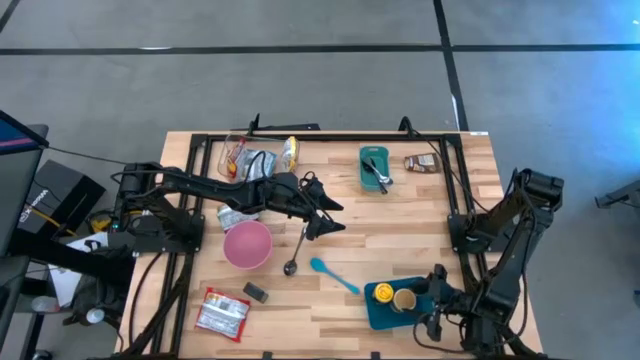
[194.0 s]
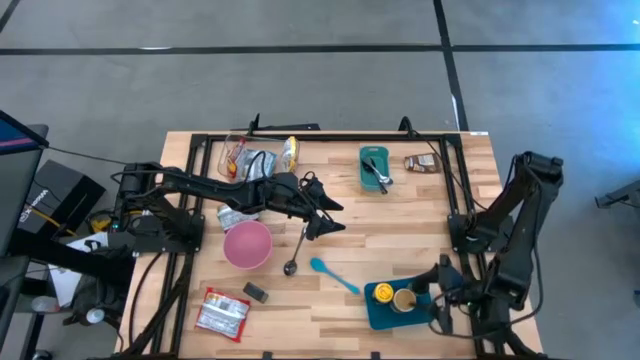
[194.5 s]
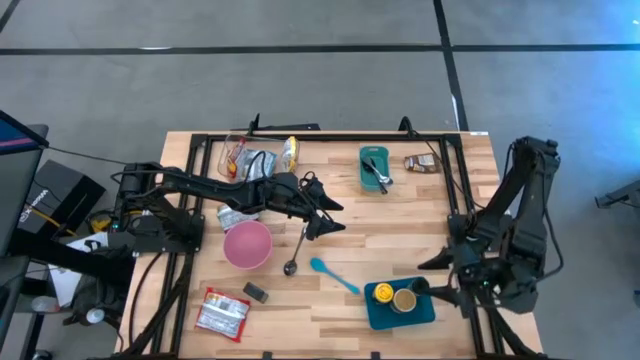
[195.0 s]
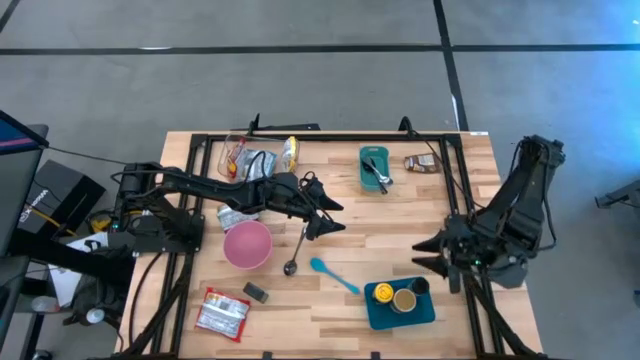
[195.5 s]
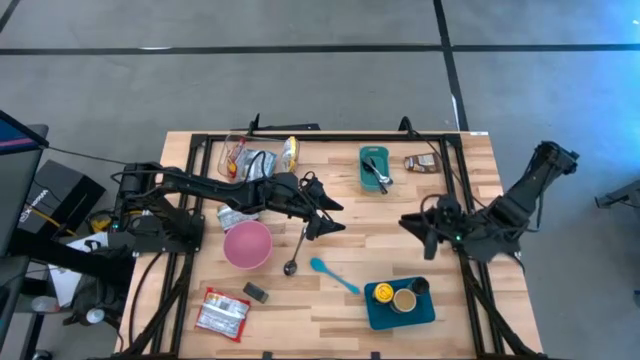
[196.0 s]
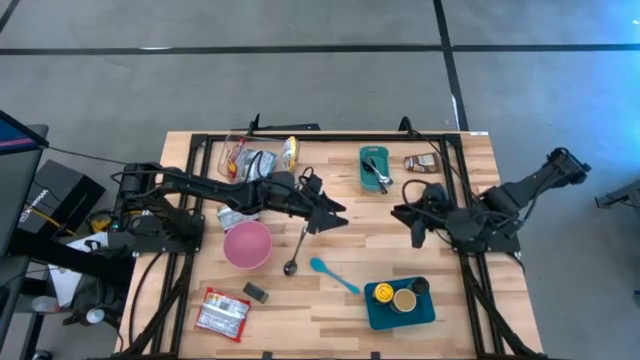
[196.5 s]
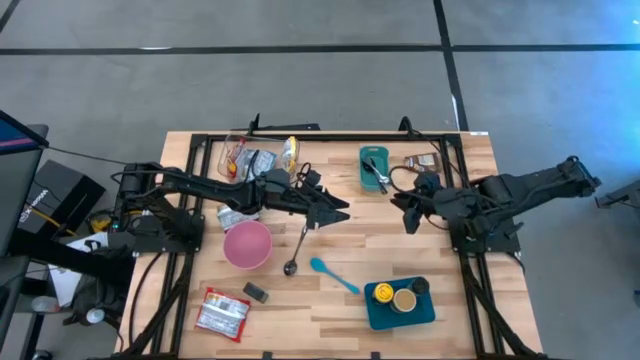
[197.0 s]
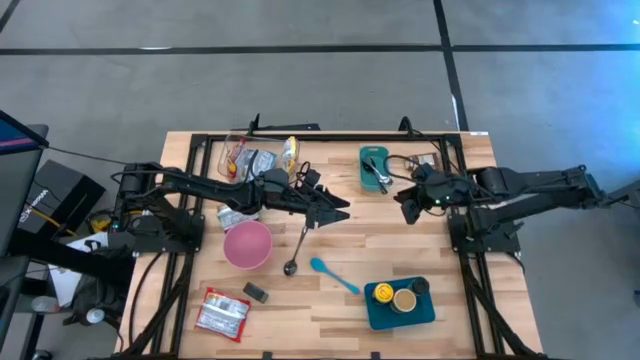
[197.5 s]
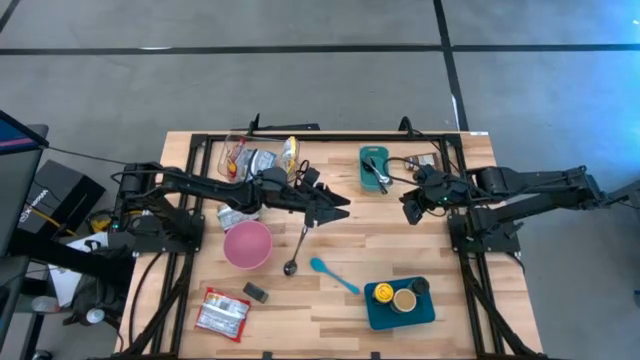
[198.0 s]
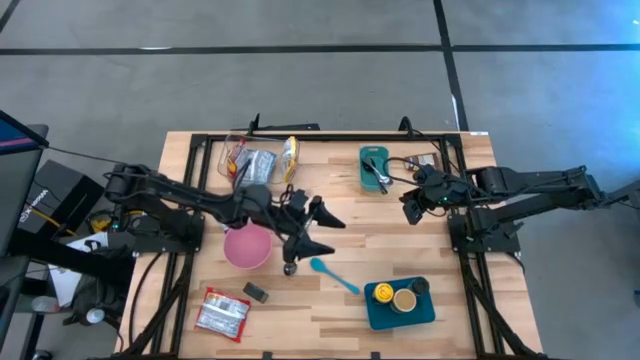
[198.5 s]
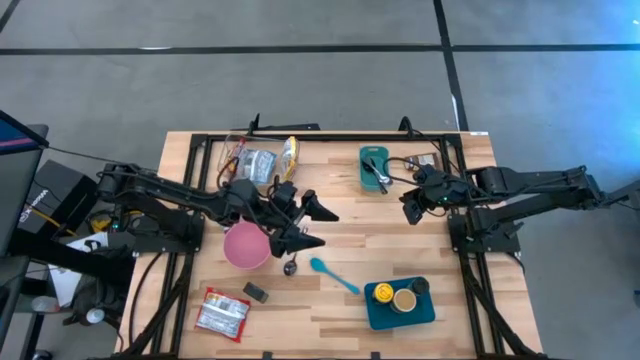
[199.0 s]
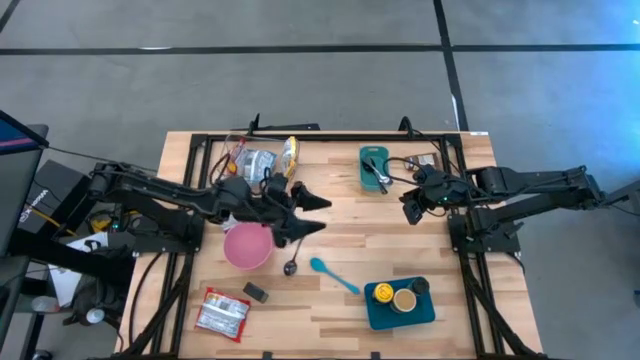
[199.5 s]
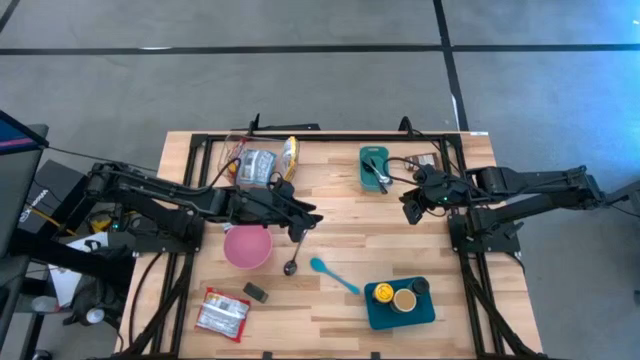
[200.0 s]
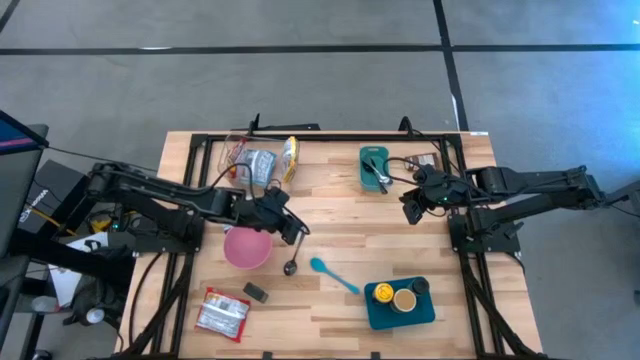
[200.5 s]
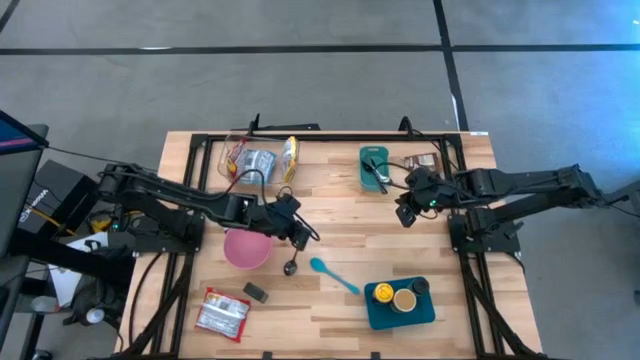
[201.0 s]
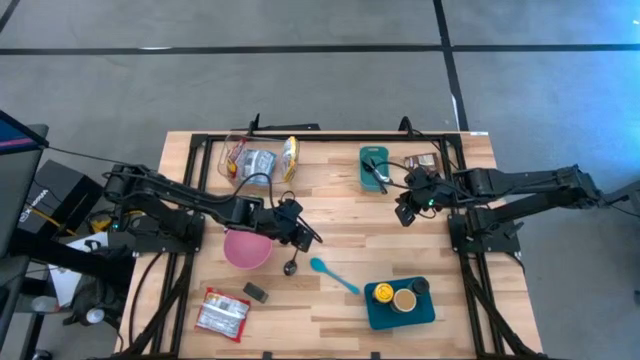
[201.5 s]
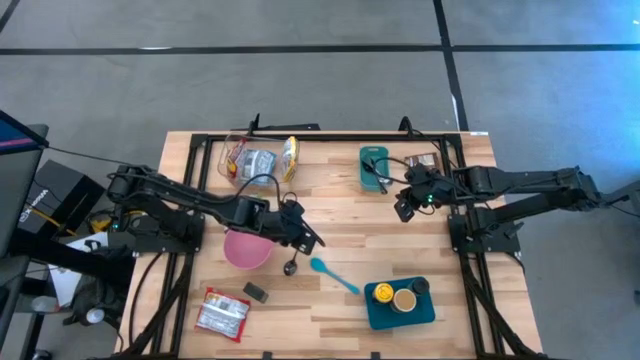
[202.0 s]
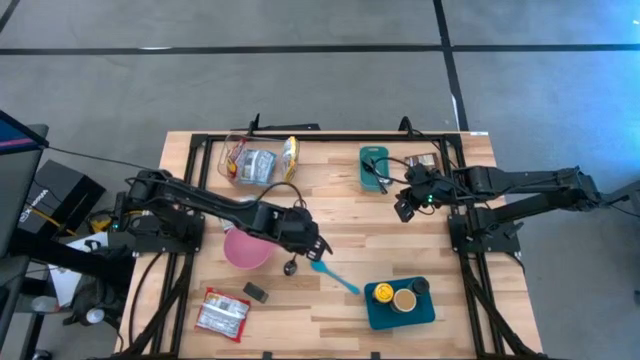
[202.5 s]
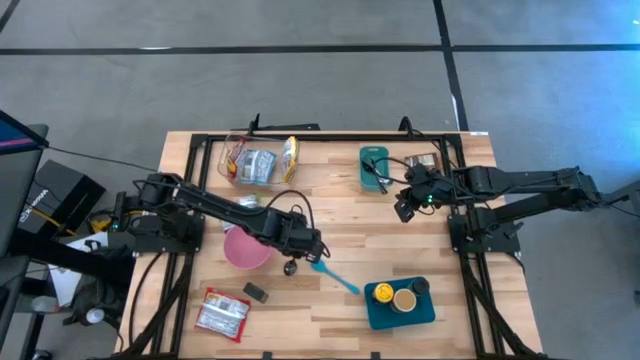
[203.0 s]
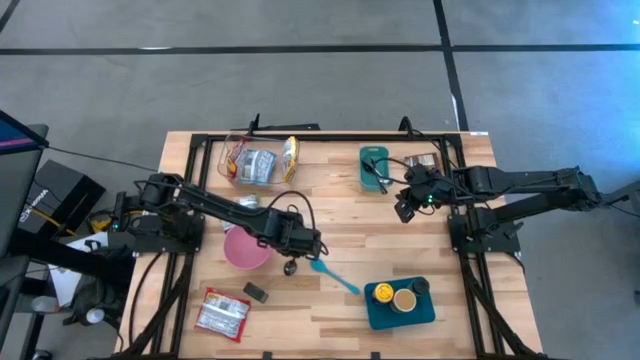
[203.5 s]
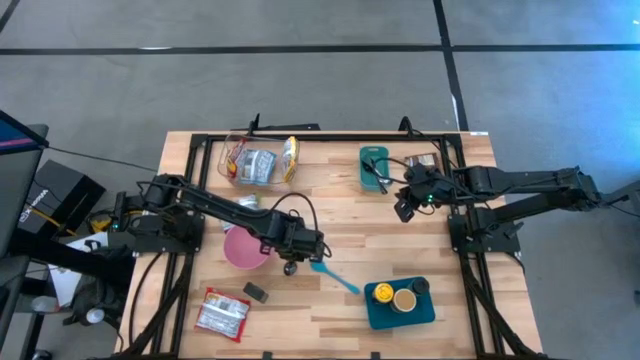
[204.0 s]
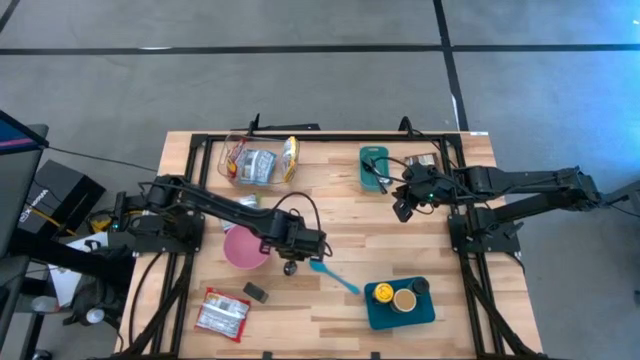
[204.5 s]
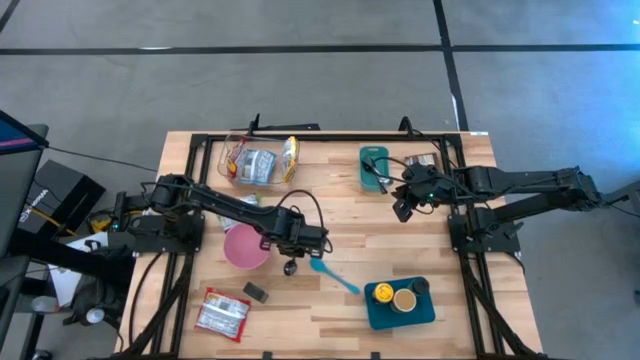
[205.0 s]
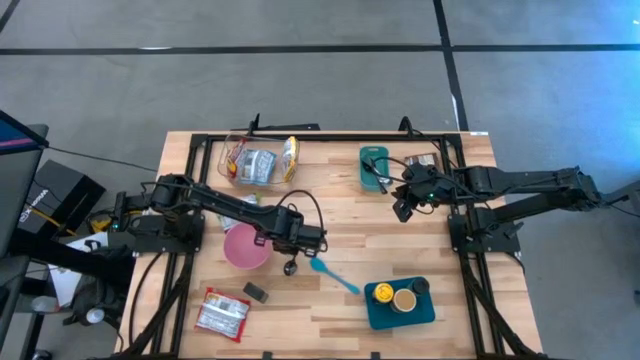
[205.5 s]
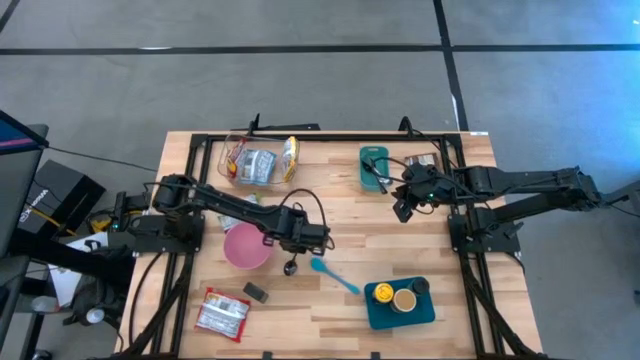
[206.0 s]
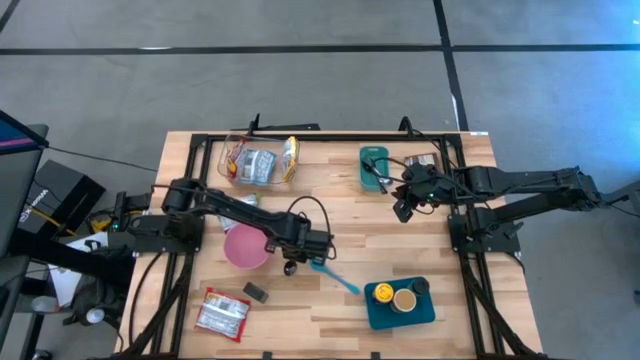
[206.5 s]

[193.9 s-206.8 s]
Task: Pick & Place Food Item
Put the black spoon into the green bin

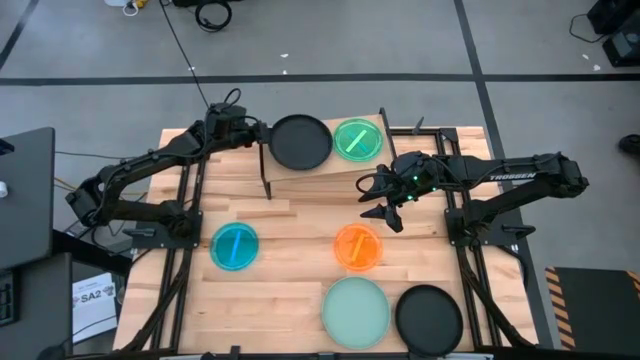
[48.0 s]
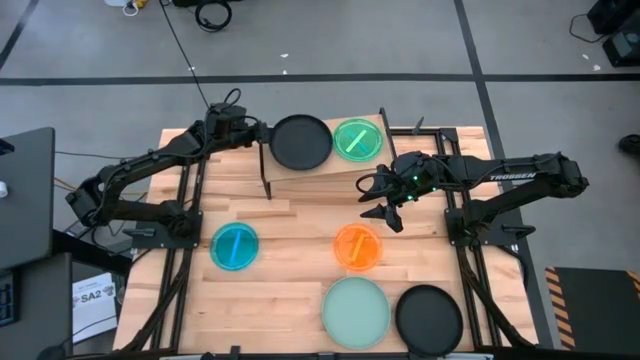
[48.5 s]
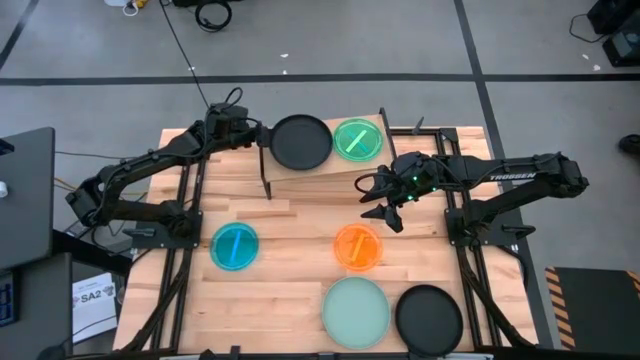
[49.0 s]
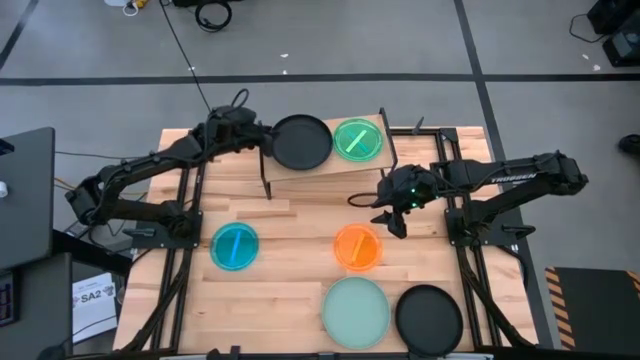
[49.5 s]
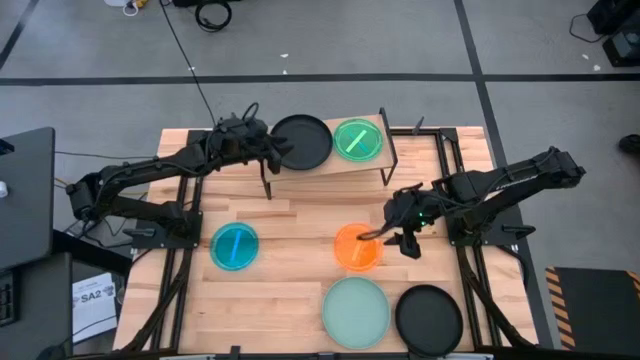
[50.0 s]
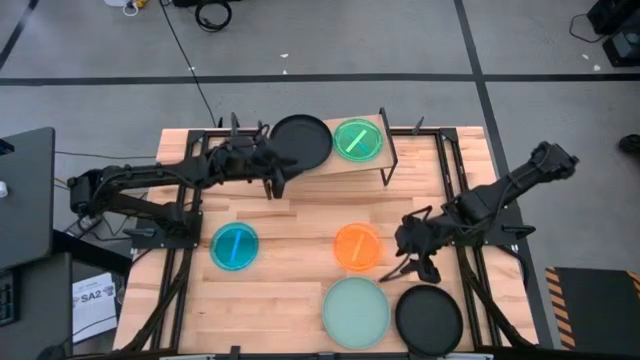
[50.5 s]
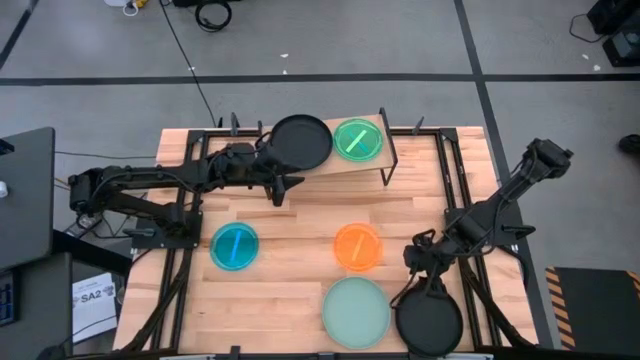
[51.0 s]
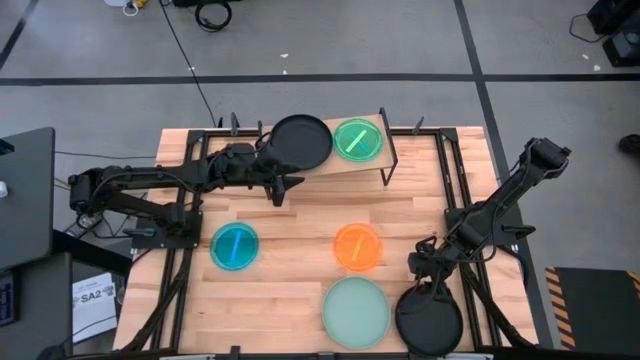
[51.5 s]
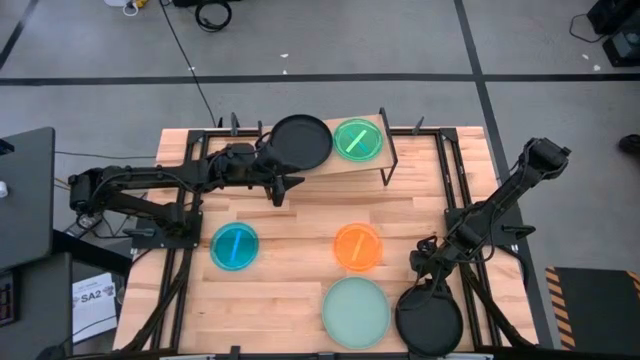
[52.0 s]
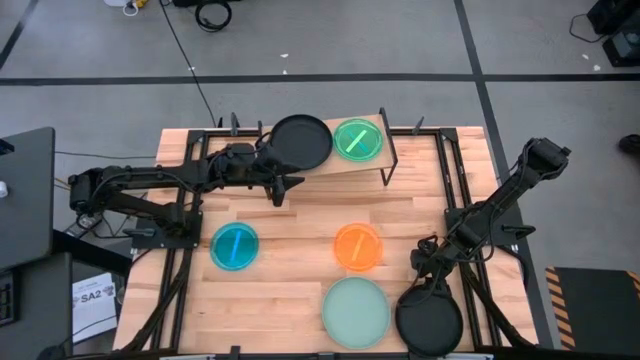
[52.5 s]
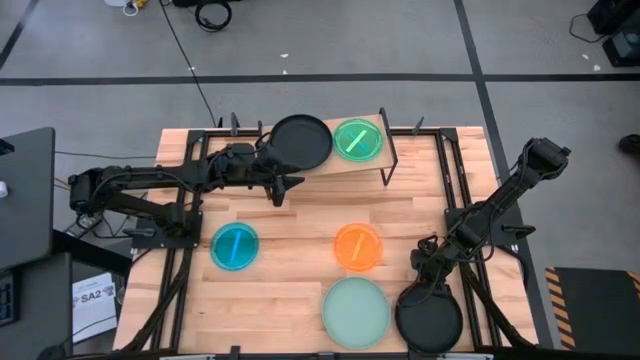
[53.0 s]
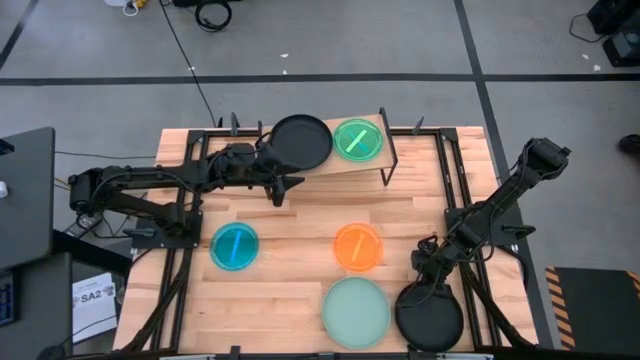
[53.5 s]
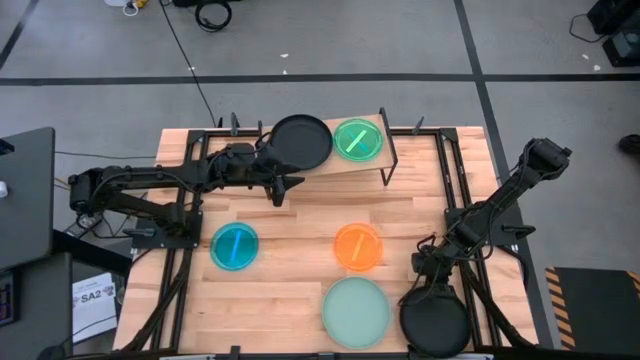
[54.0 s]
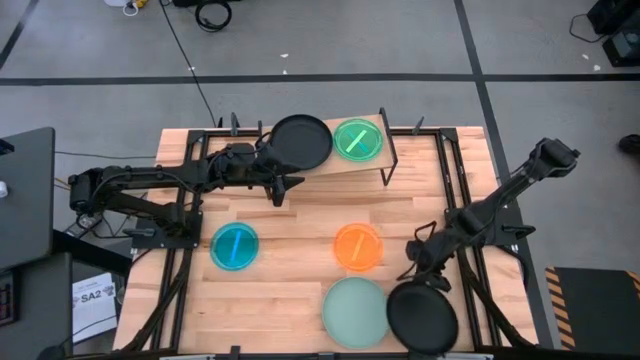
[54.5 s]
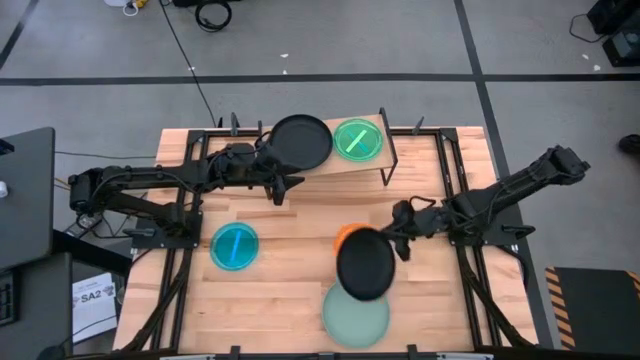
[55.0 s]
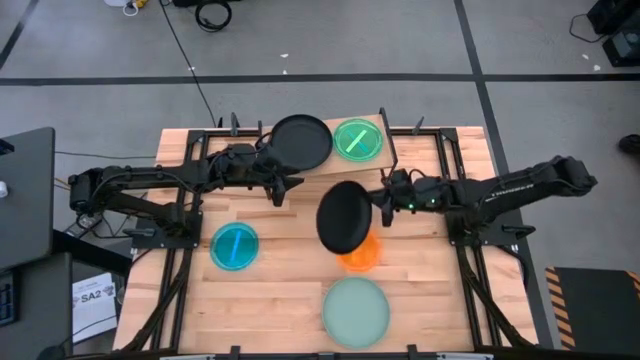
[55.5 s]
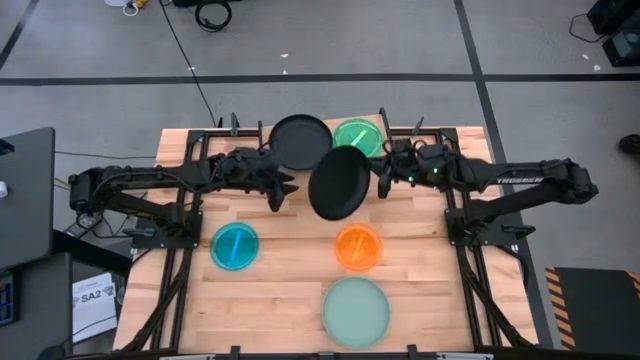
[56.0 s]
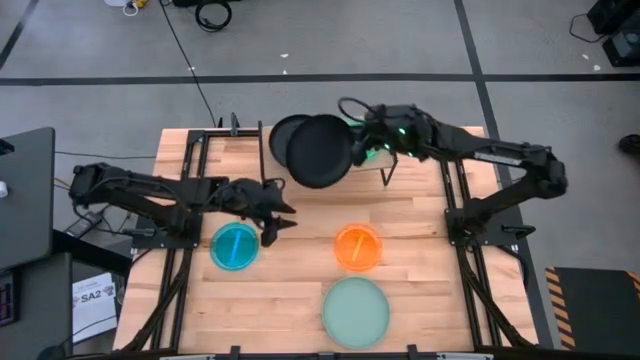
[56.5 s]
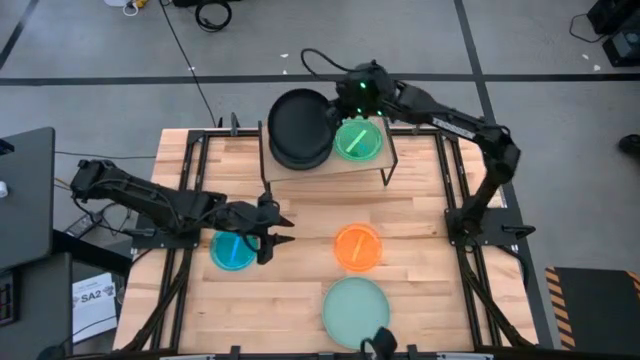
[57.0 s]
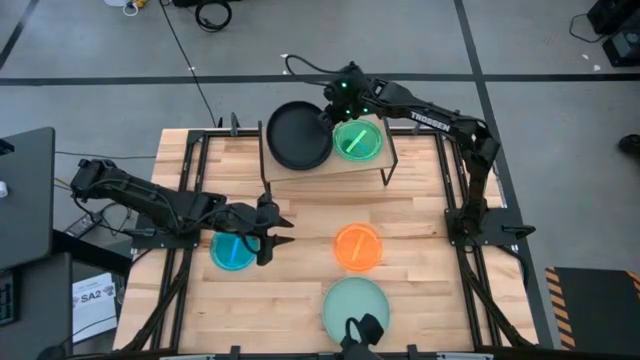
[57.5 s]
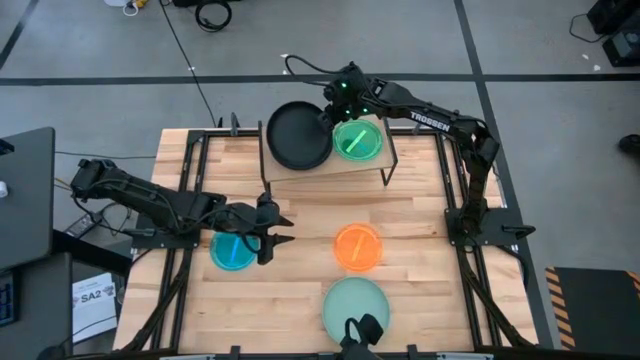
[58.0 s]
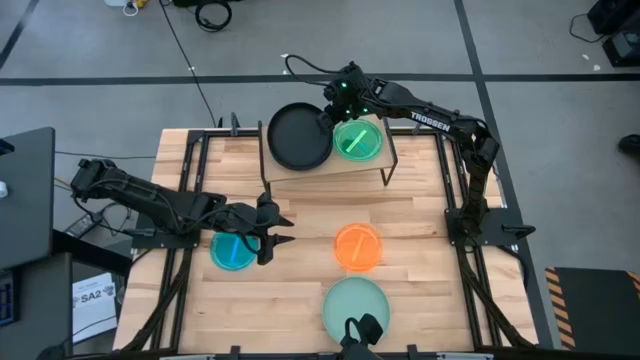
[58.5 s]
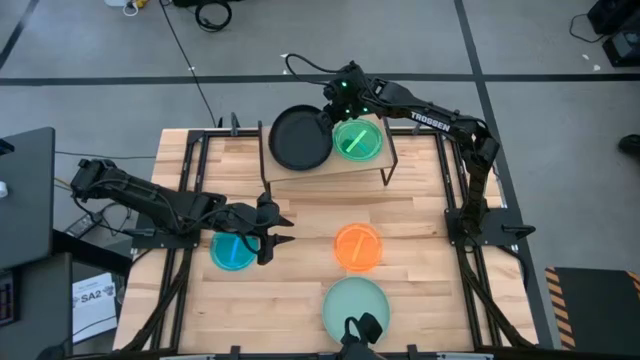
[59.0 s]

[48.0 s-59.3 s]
Task: Place and stack plates onto a shelf
Stack the black plate on top of the black plate on the shelf
